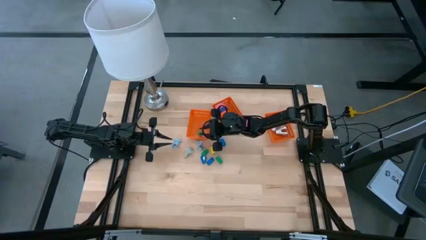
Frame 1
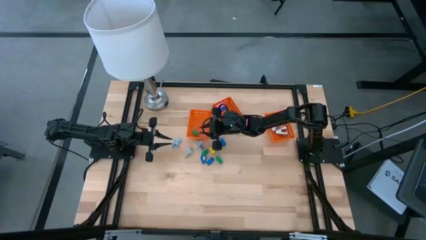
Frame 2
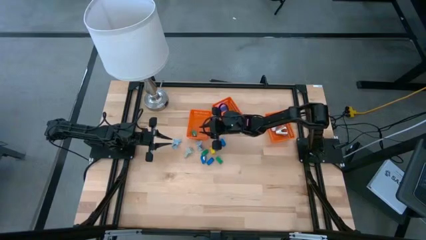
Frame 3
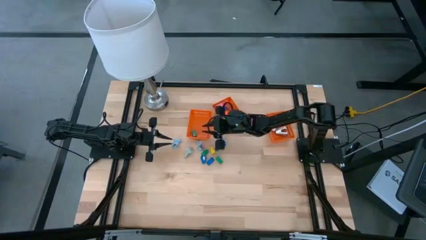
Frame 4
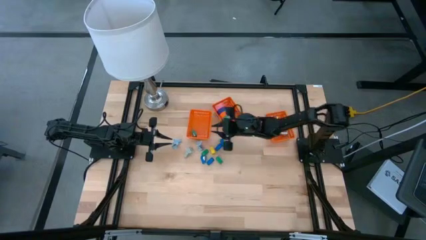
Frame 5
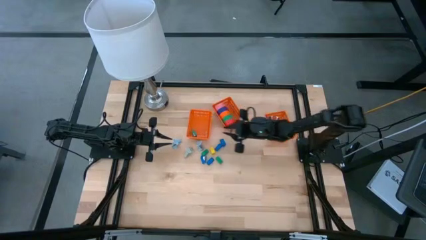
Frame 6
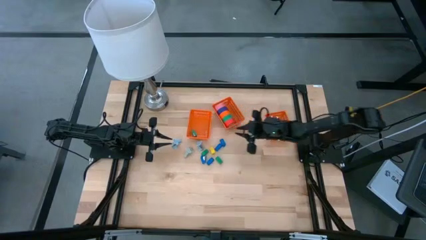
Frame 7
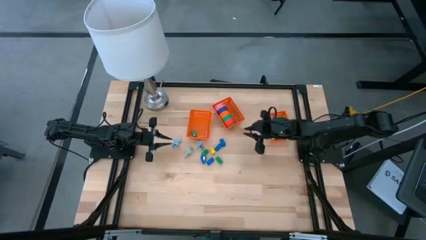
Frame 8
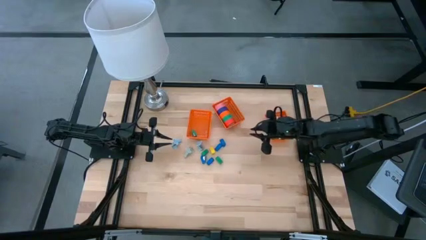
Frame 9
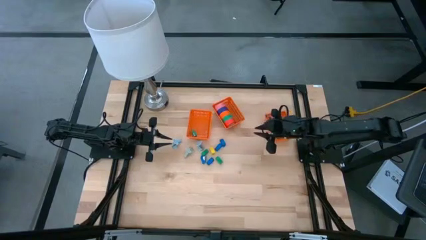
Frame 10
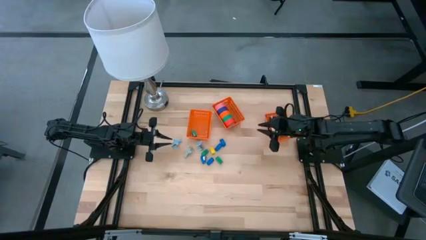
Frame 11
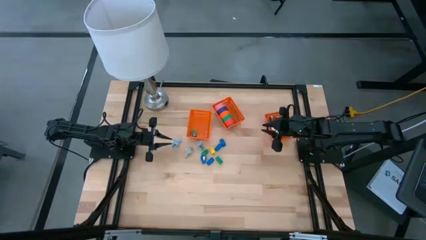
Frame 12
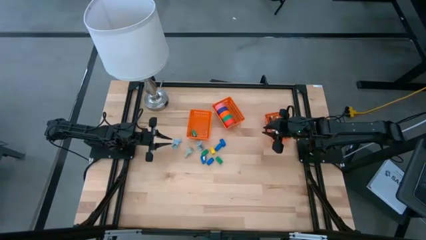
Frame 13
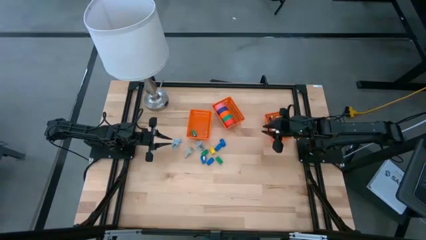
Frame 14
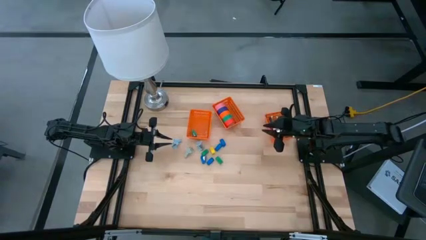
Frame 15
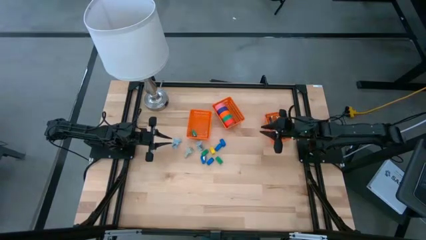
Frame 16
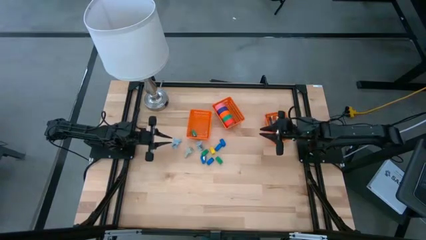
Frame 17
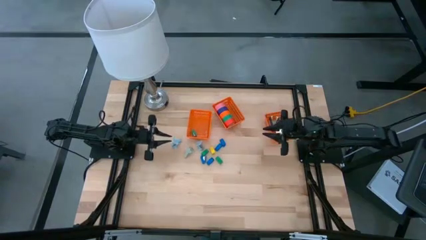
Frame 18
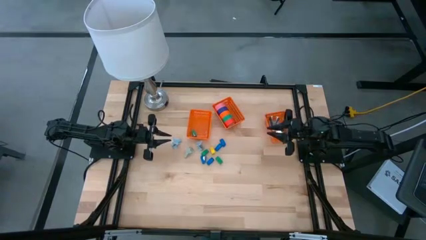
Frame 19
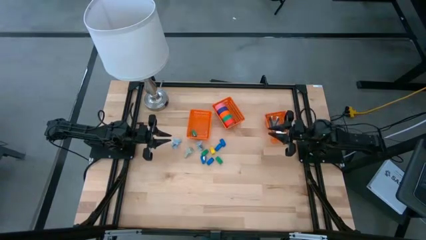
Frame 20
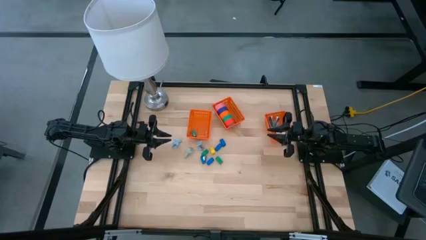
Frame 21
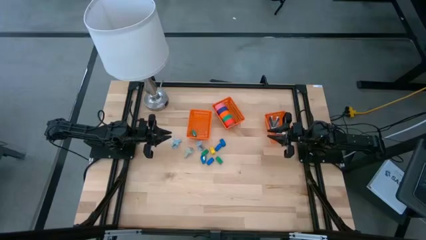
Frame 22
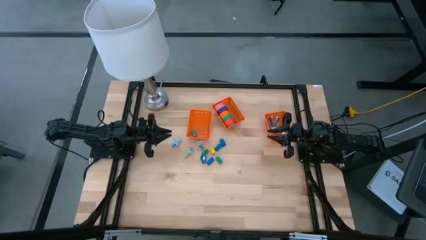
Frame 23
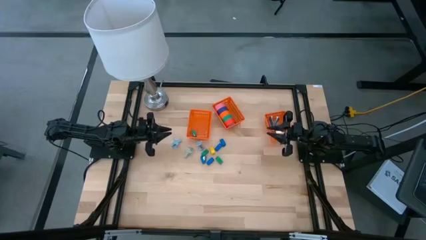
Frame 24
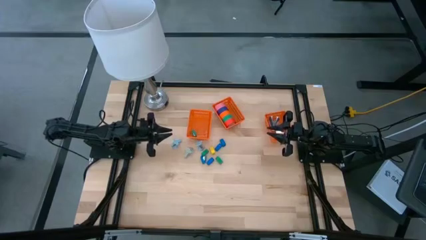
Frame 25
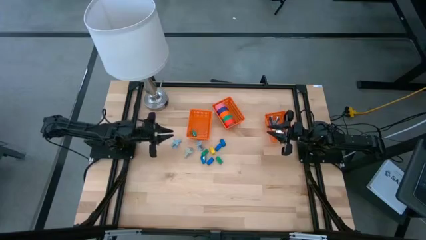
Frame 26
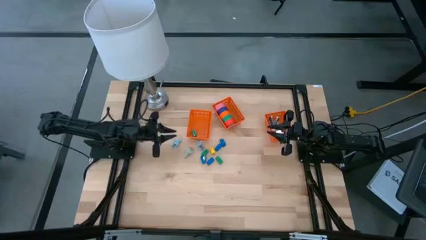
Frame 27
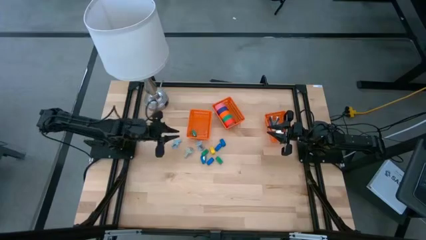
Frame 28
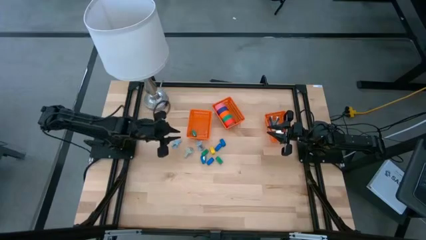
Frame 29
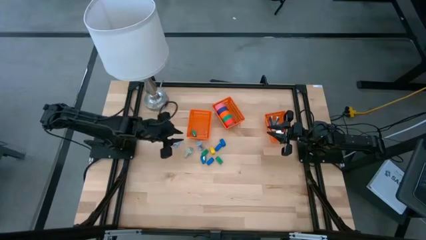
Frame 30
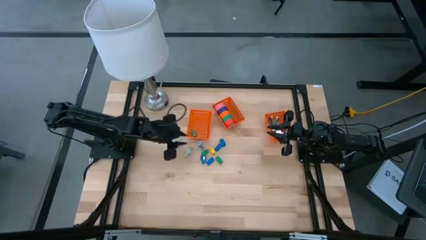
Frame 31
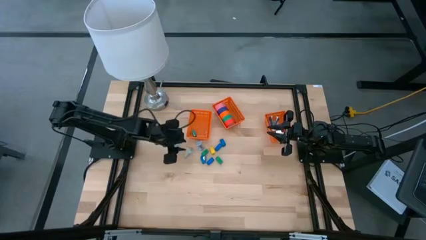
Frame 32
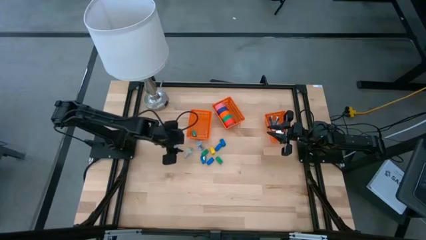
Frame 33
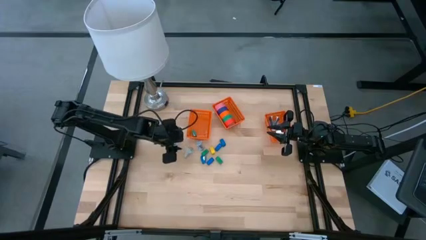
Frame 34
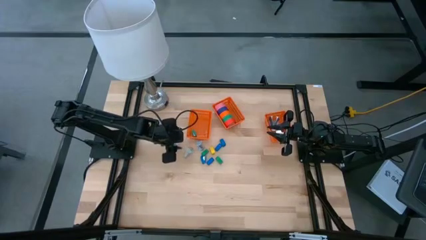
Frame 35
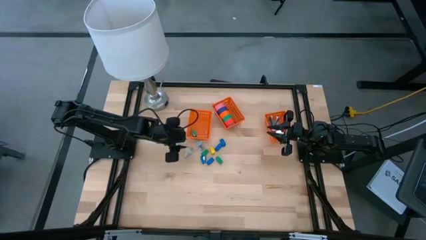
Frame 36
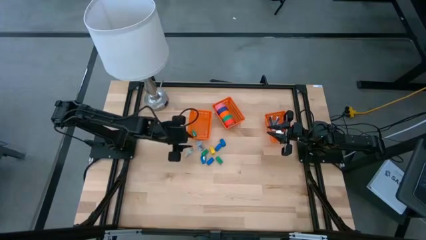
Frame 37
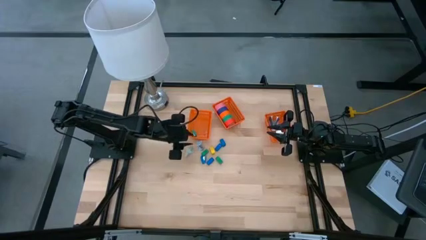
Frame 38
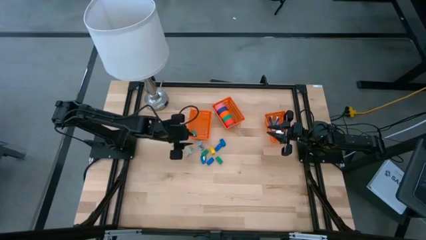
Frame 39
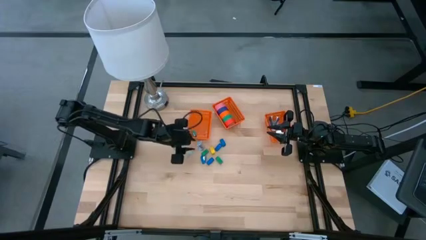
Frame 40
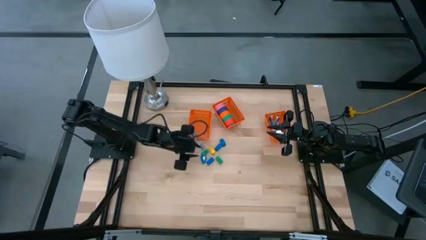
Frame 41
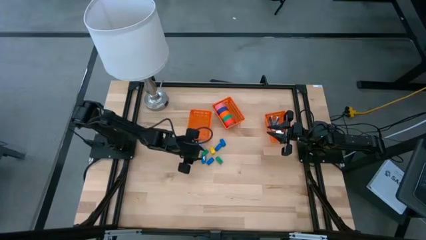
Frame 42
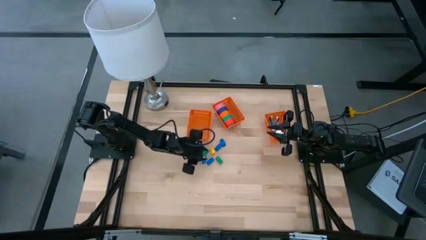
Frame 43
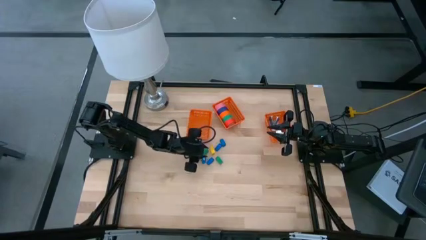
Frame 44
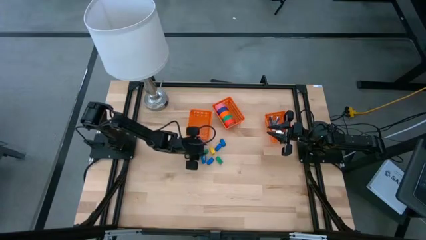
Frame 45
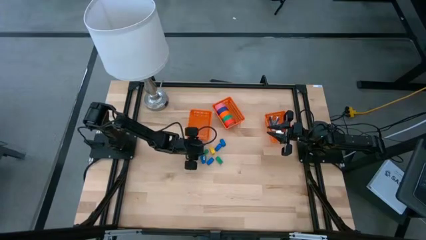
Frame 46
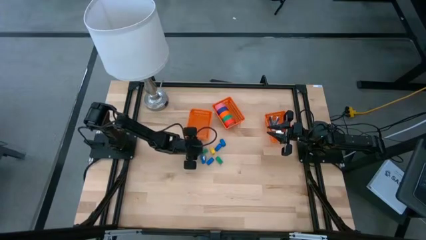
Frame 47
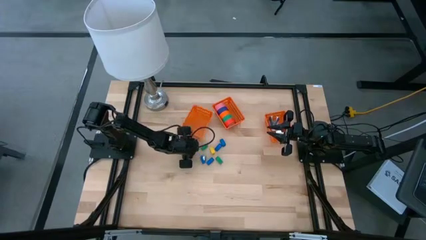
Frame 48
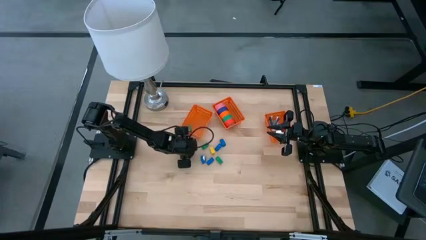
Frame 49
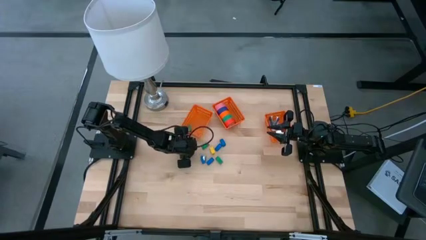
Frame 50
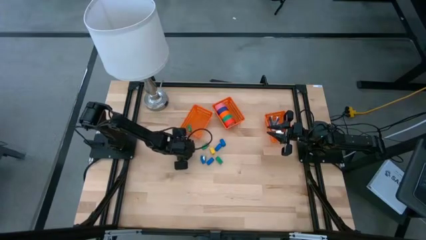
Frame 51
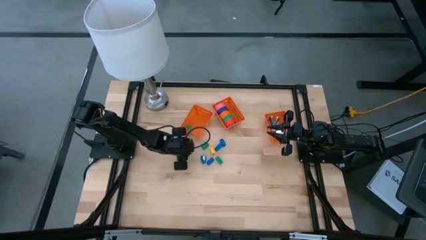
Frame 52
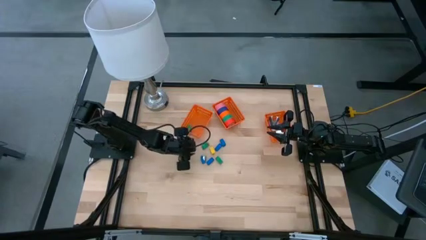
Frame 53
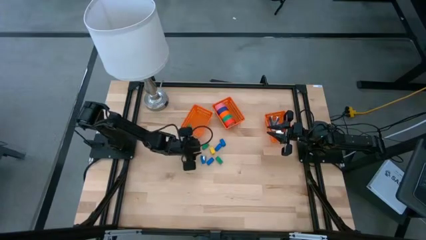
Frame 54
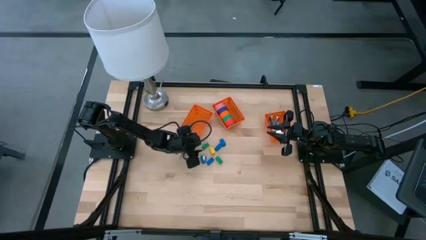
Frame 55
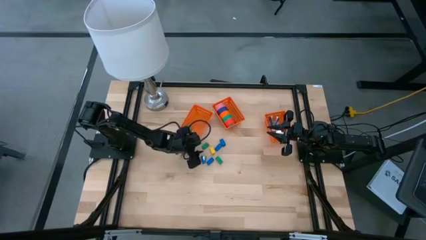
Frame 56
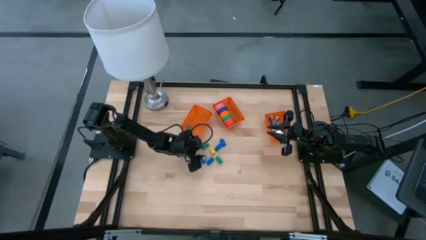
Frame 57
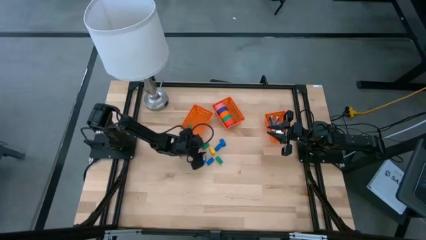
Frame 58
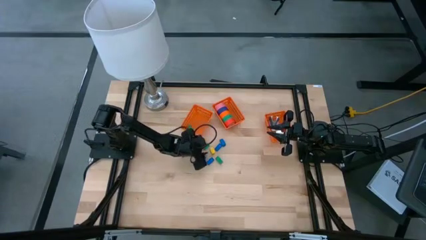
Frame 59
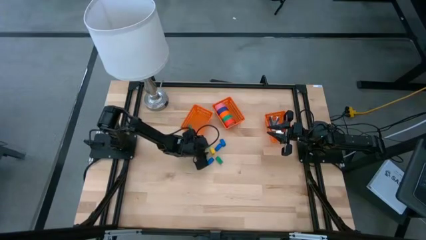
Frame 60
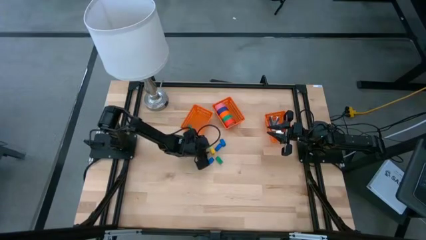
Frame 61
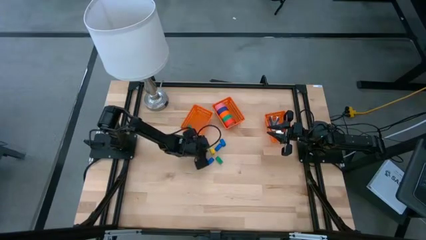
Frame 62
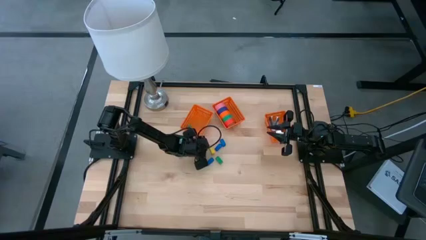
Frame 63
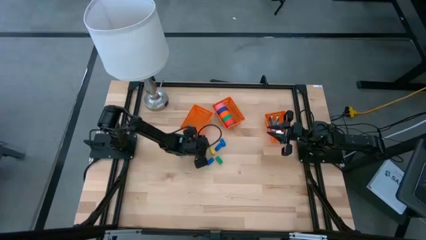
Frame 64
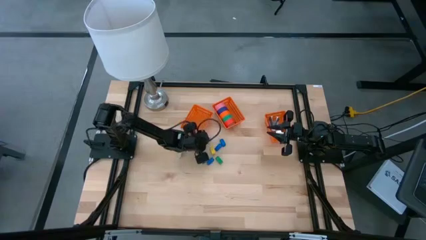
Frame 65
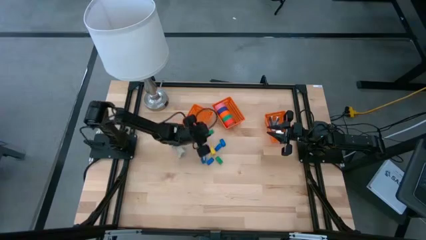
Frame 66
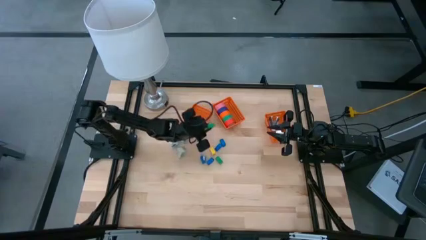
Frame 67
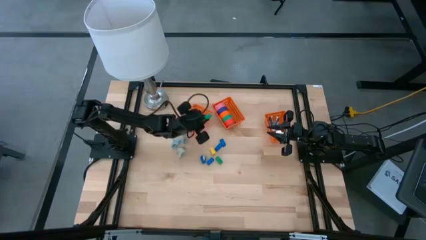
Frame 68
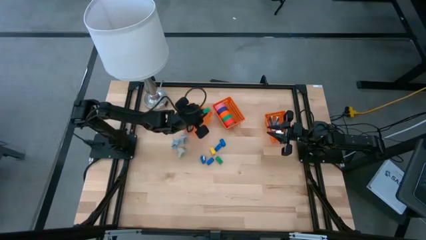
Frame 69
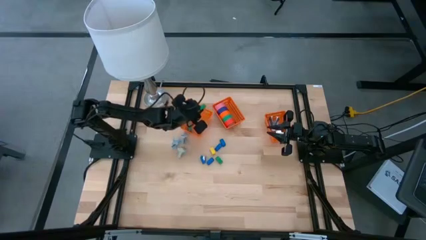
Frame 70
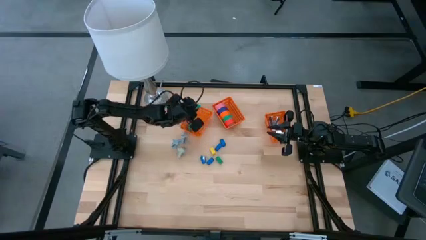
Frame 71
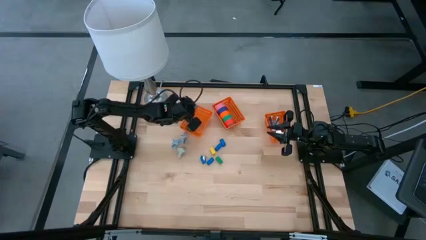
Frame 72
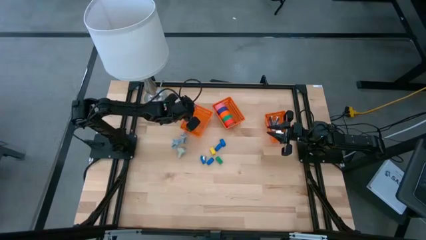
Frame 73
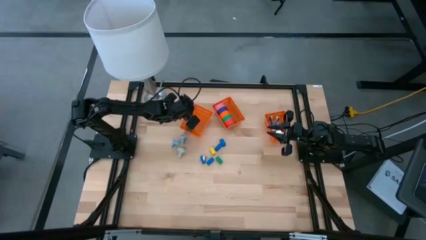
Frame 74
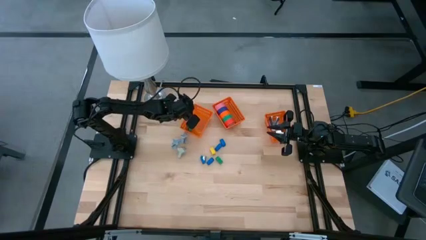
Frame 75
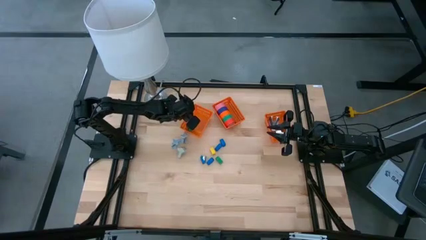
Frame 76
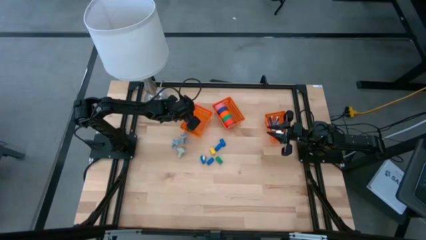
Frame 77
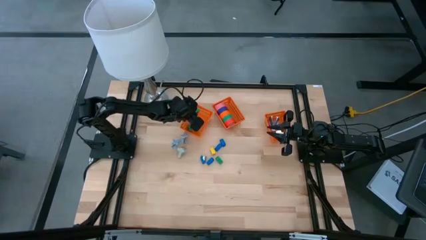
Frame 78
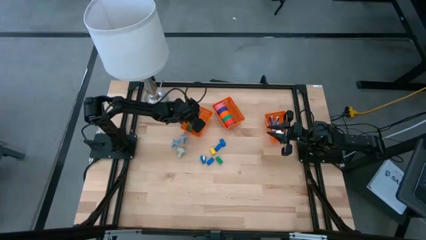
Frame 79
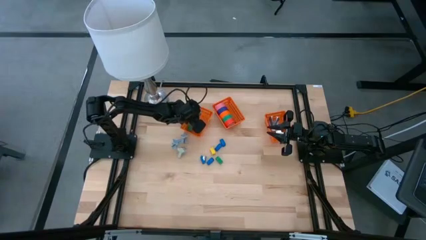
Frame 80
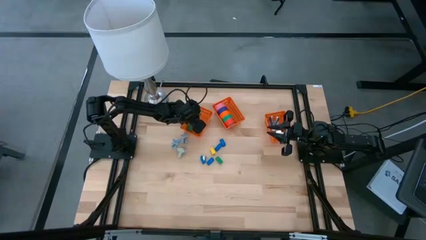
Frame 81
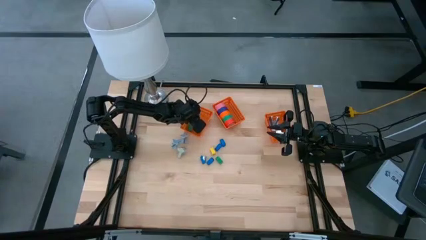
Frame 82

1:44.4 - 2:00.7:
Task: Pick and place Stapler, Stapler remover, tape
Put the green stapler into the left orange bin
